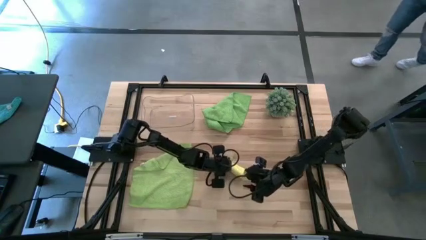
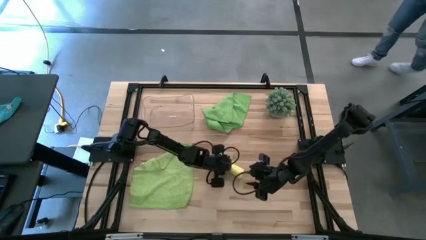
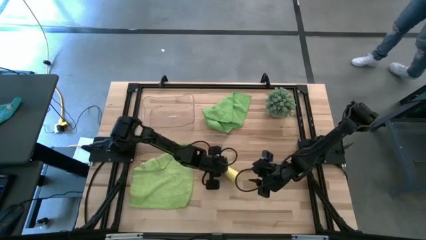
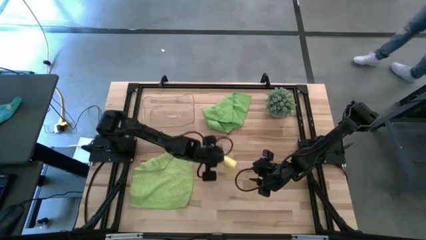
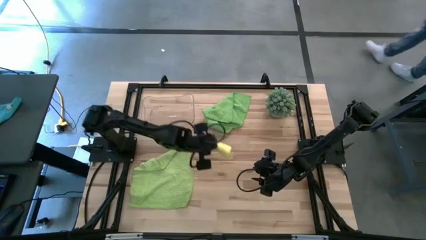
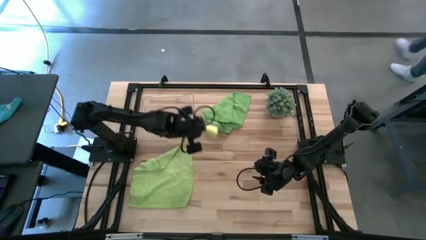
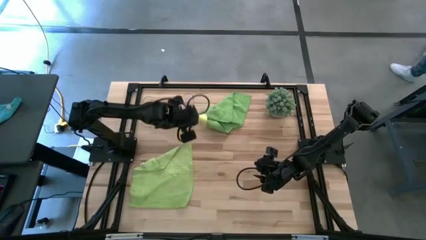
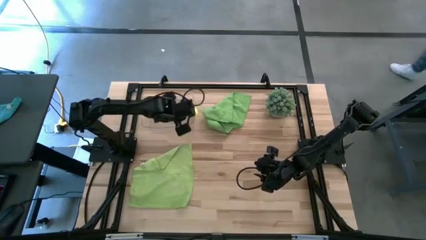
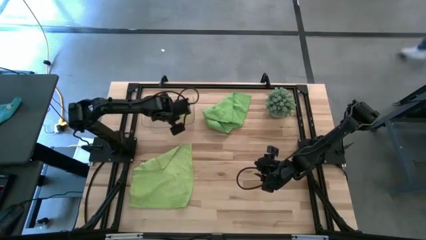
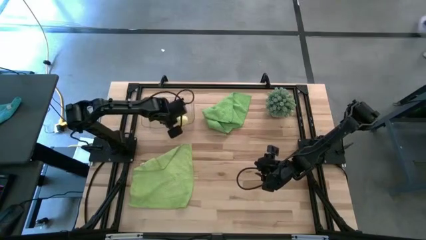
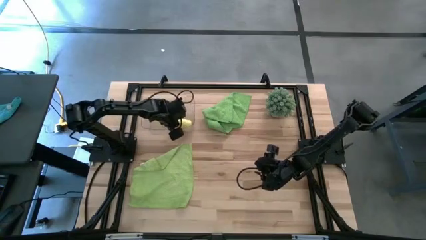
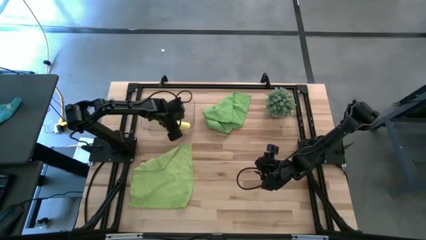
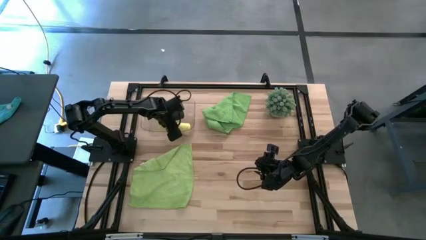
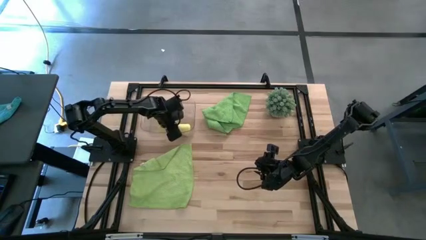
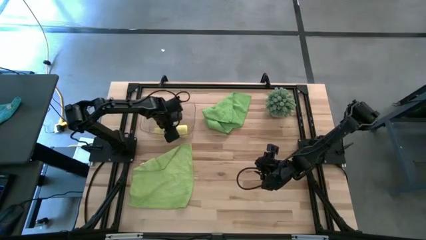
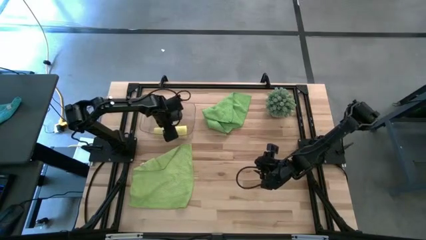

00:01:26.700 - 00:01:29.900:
Task: Roll microfiber towels into tight, uniform cylinder then place into a basket
Put the yellow towel into the transparent bin

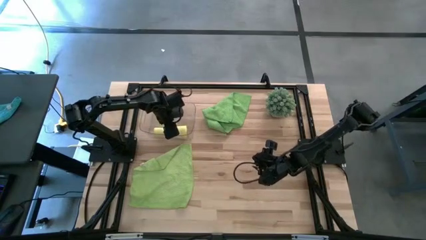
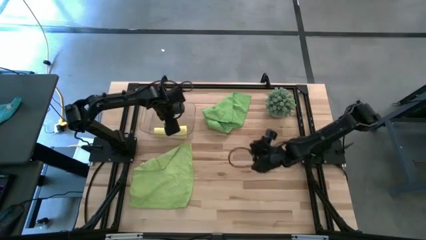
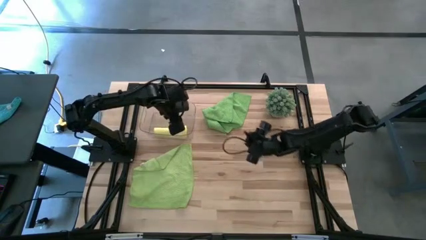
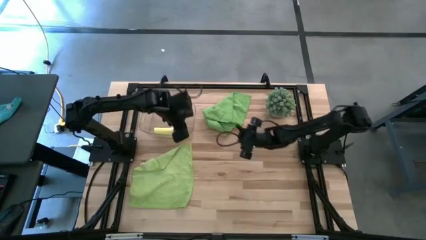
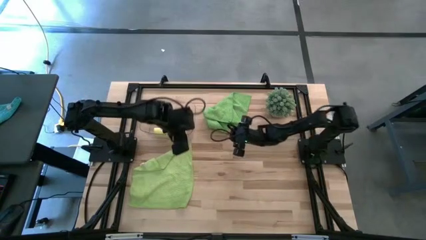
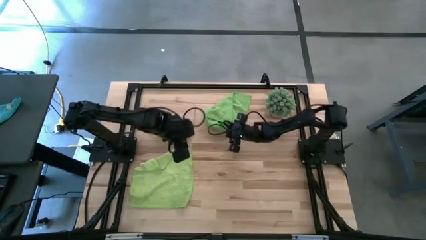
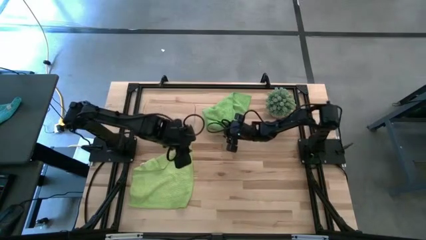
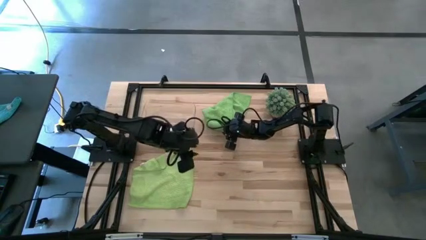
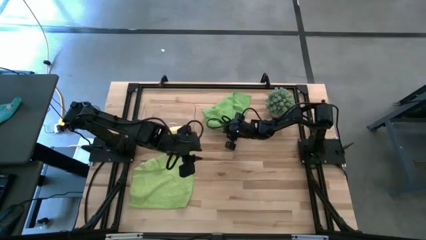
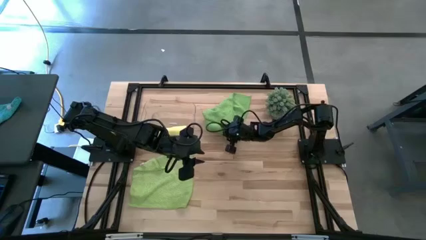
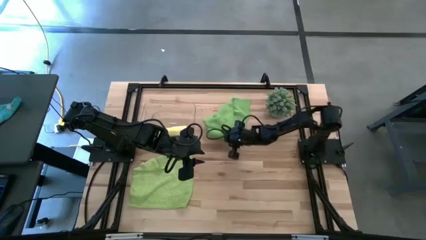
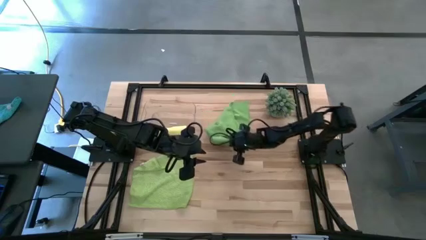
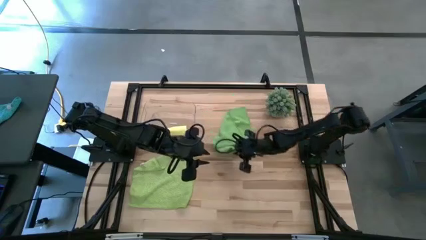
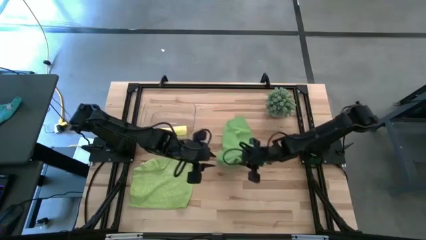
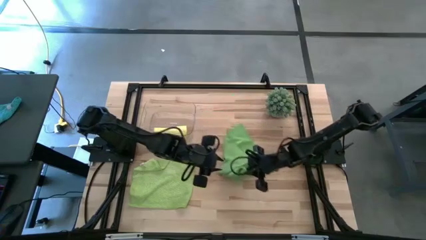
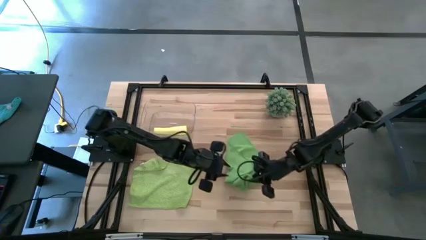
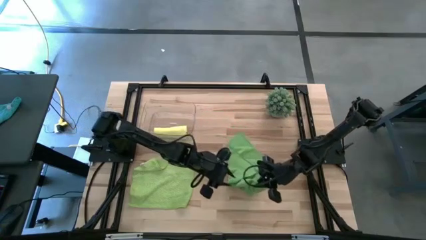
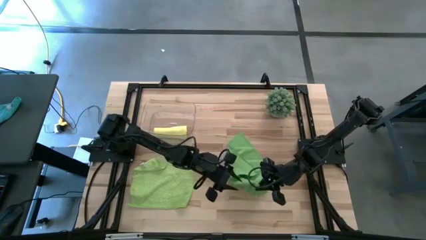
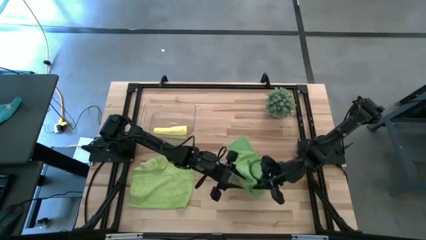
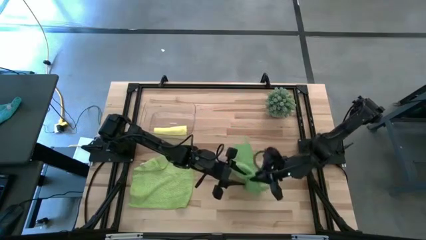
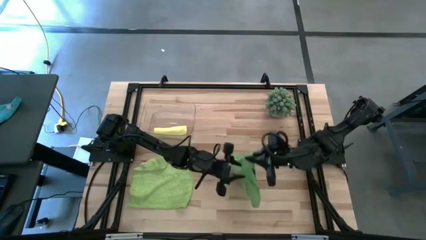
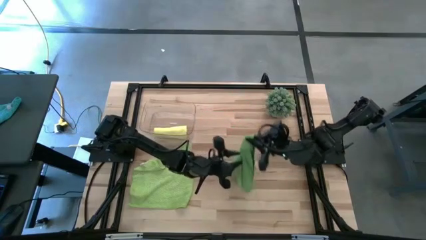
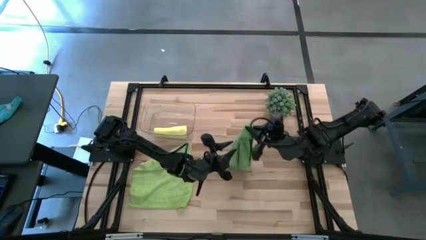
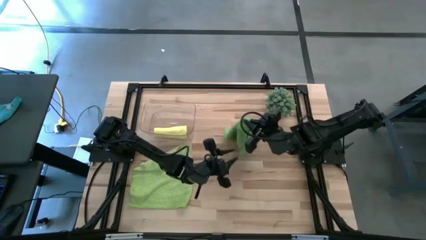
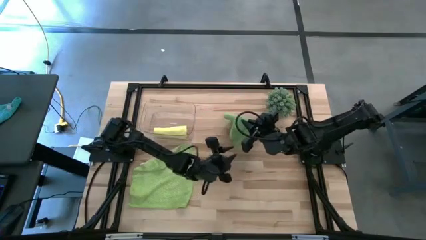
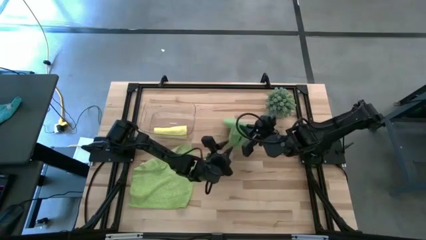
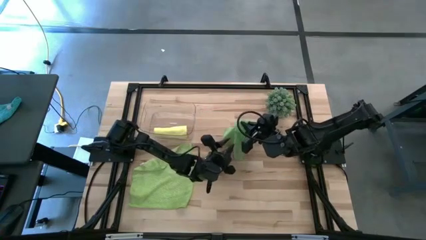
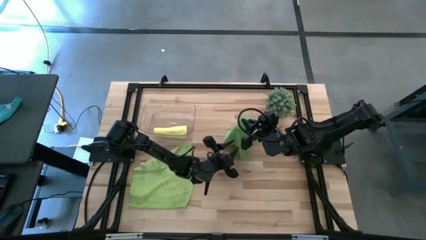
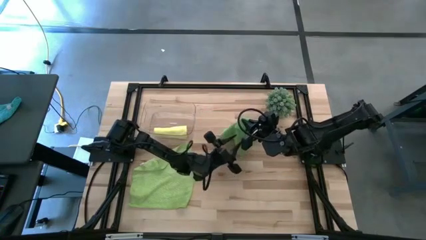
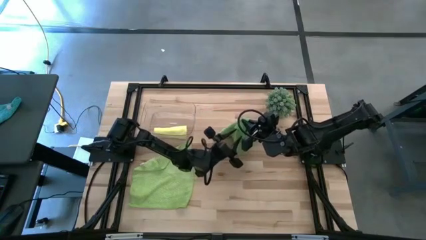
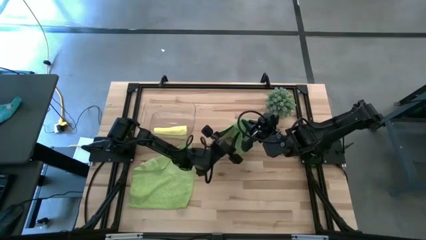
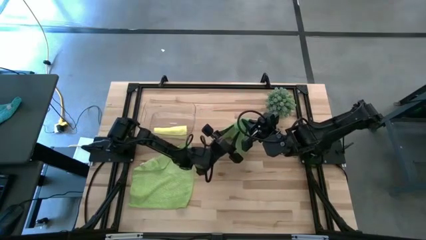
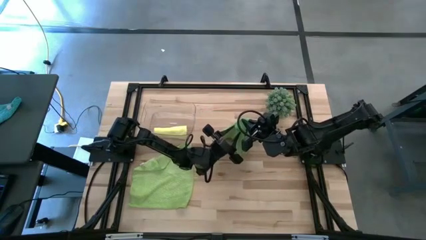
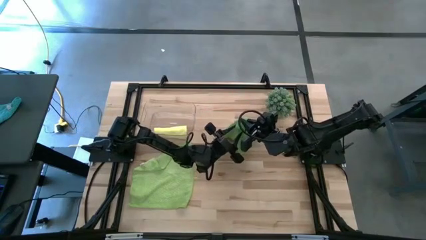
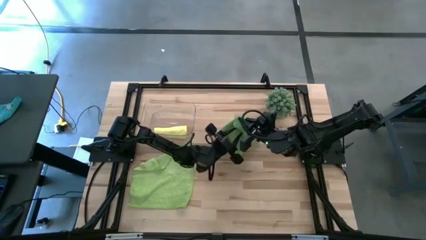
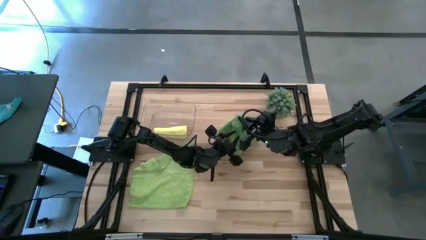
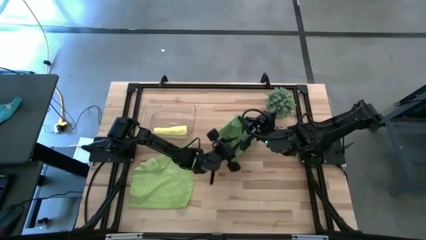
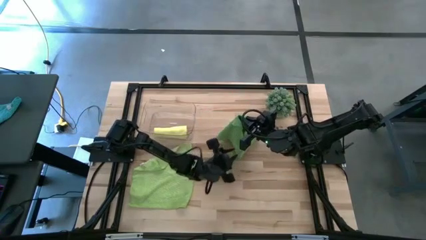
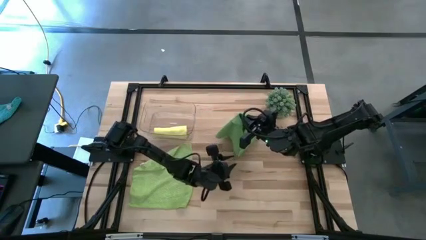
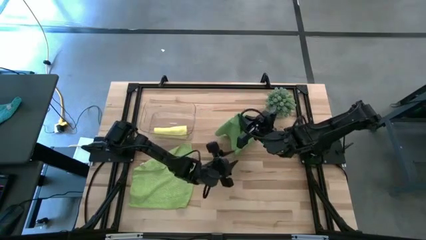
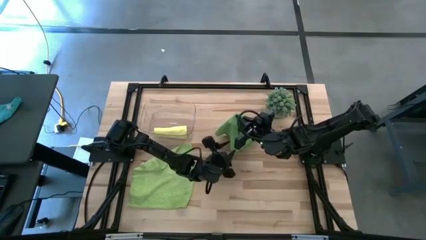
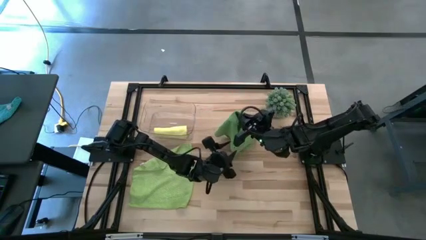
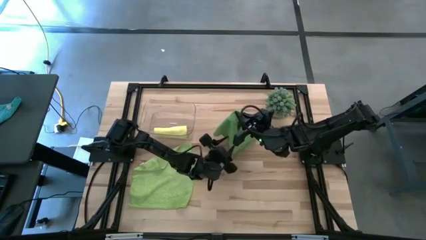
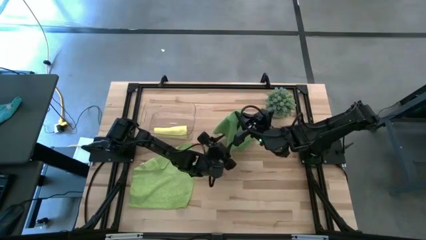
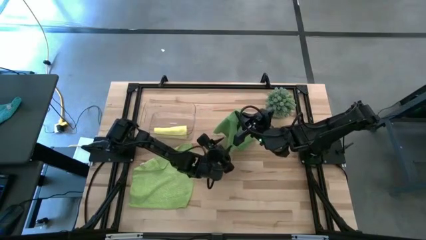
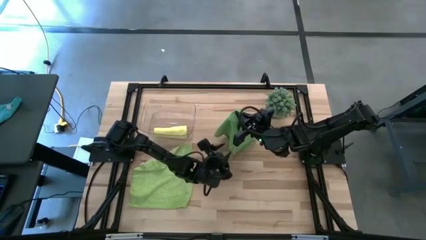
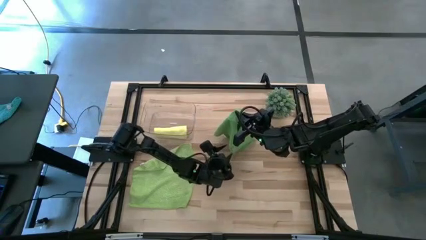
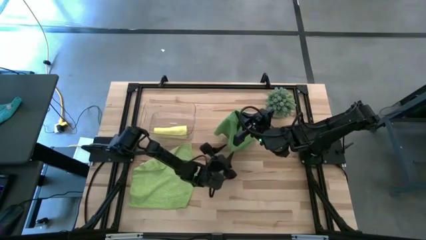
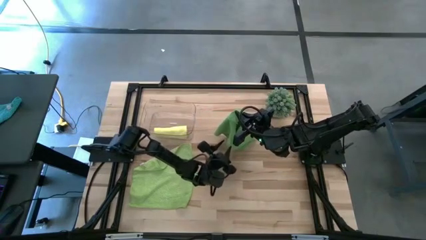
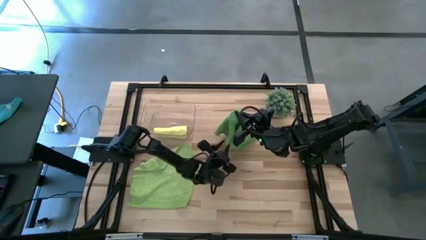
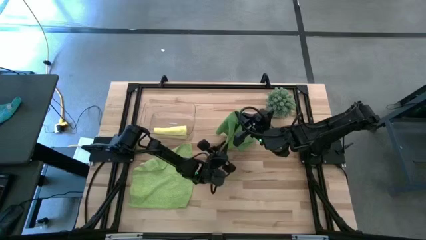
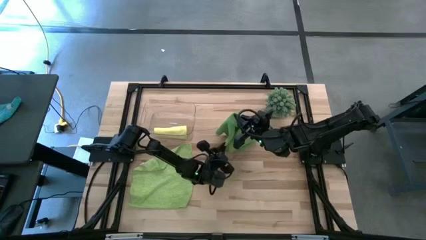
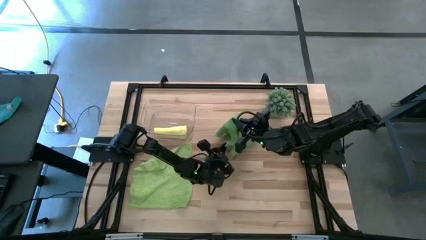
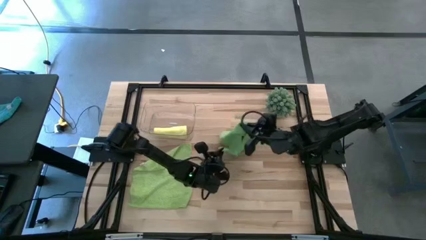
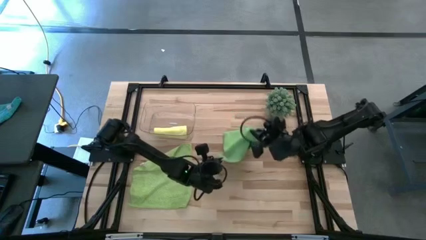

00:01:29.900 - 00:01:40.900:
Fold the right green towel
